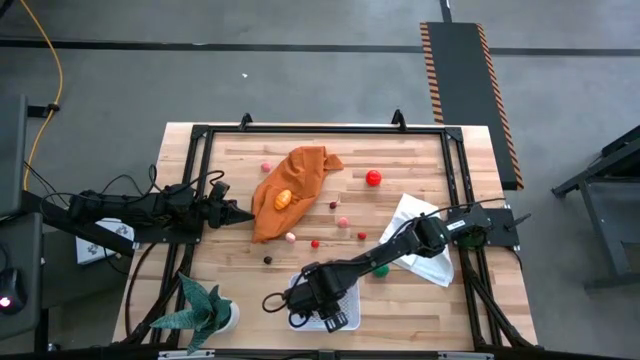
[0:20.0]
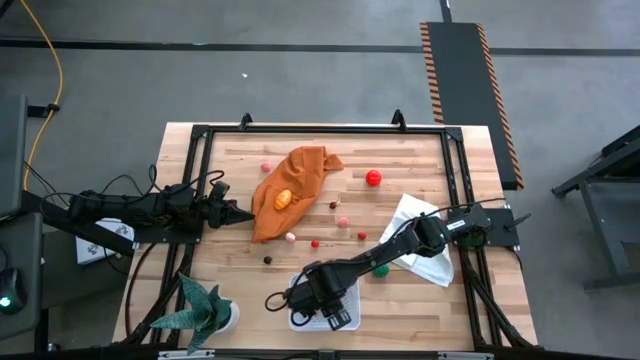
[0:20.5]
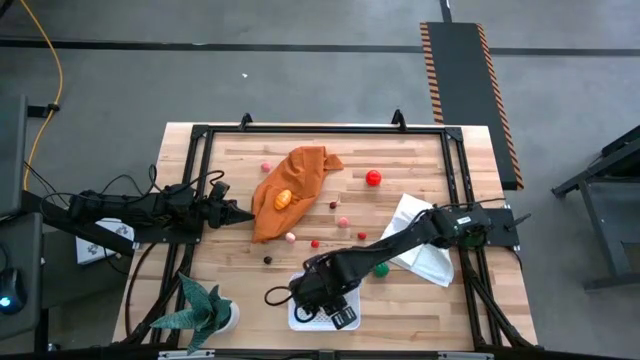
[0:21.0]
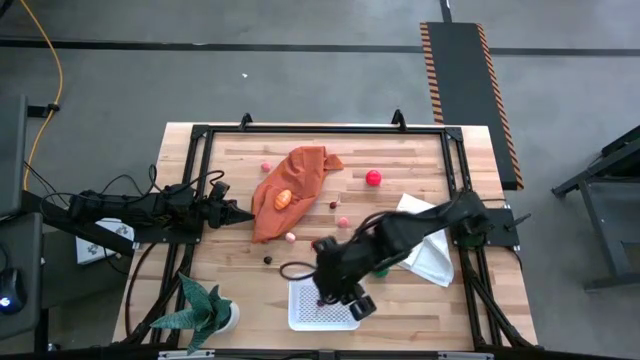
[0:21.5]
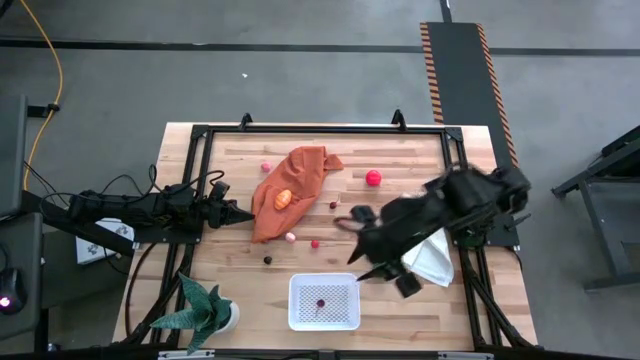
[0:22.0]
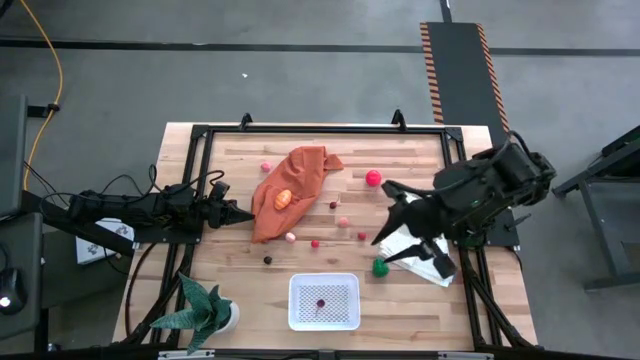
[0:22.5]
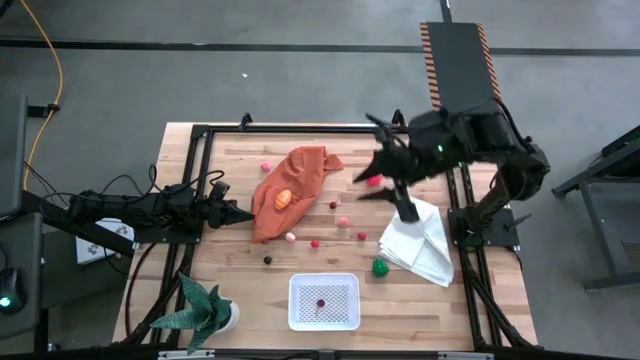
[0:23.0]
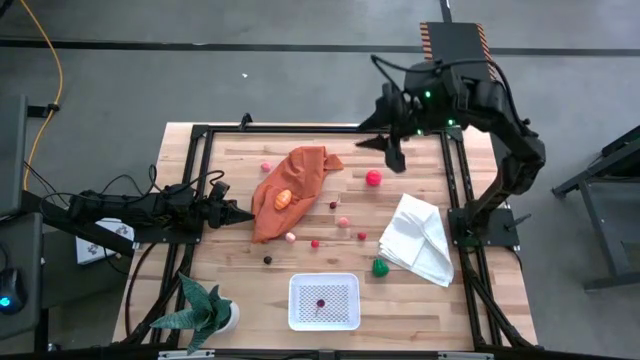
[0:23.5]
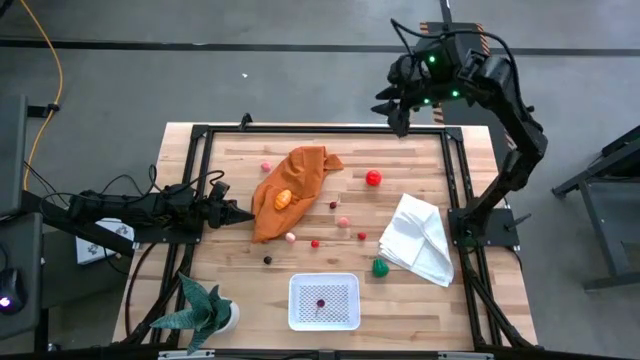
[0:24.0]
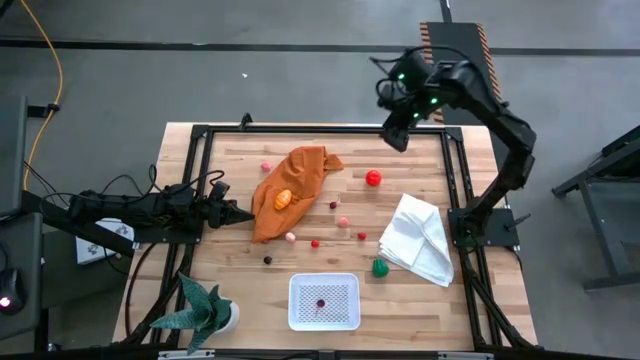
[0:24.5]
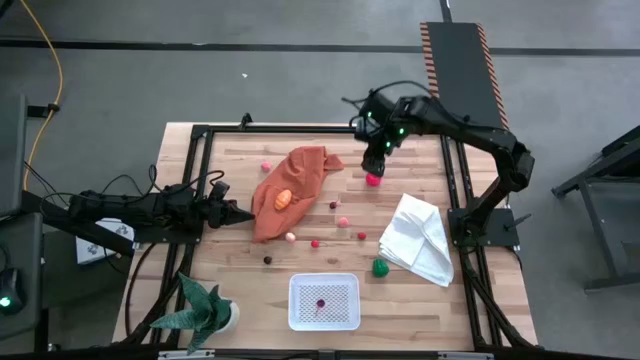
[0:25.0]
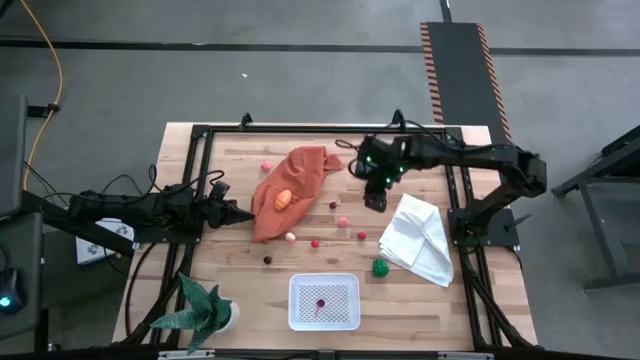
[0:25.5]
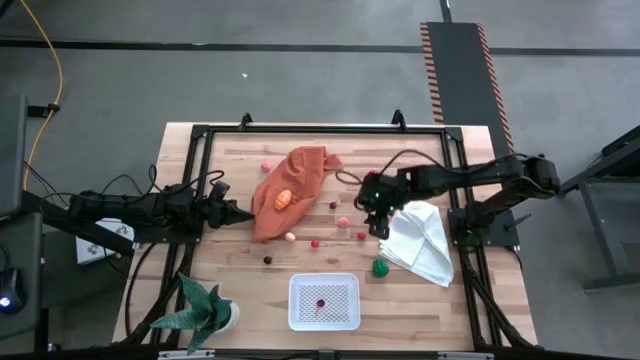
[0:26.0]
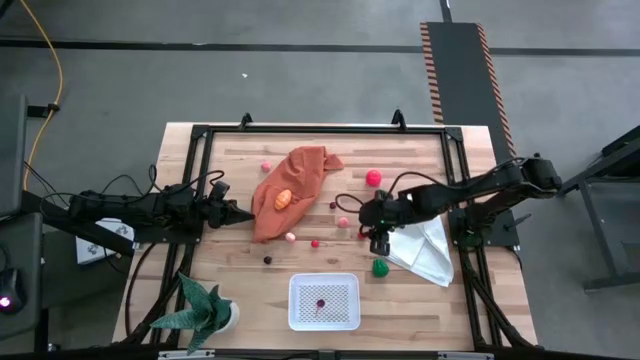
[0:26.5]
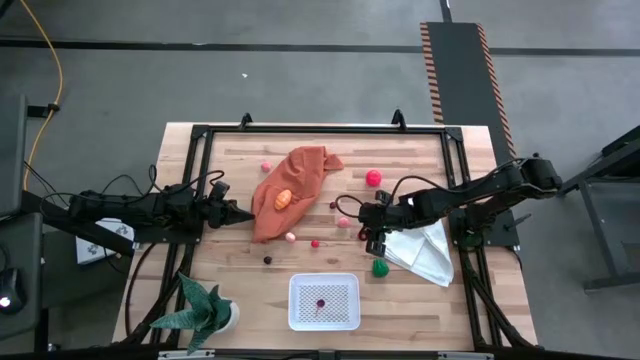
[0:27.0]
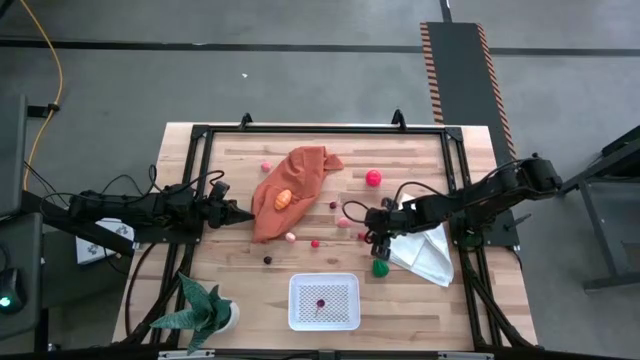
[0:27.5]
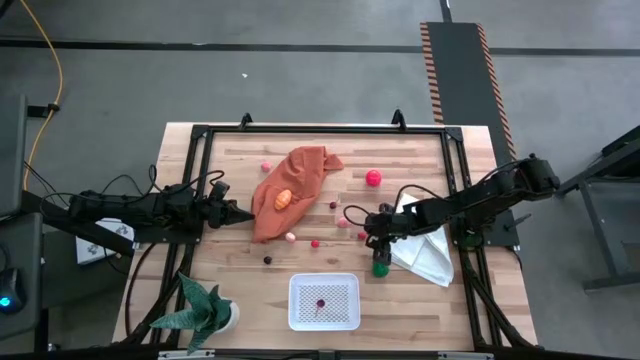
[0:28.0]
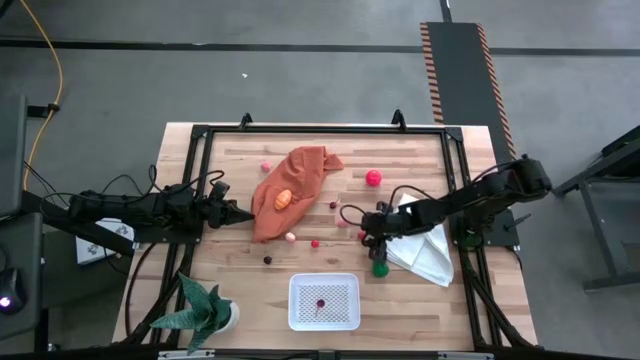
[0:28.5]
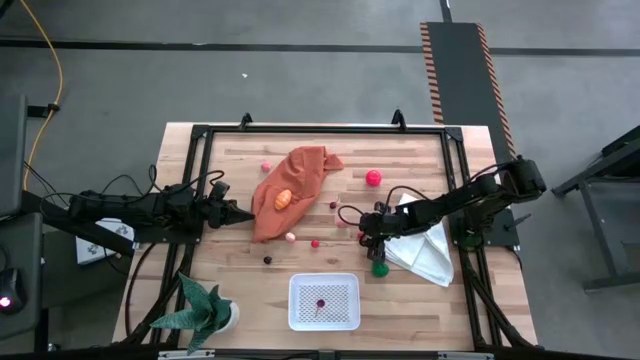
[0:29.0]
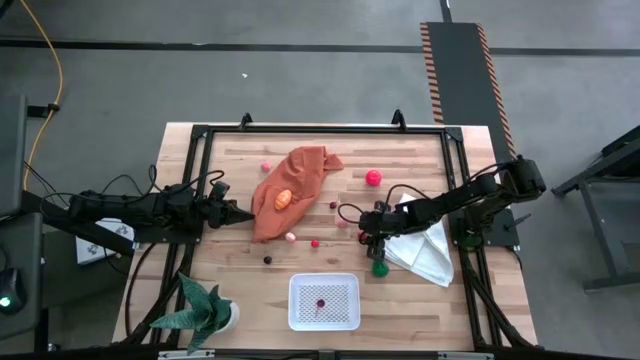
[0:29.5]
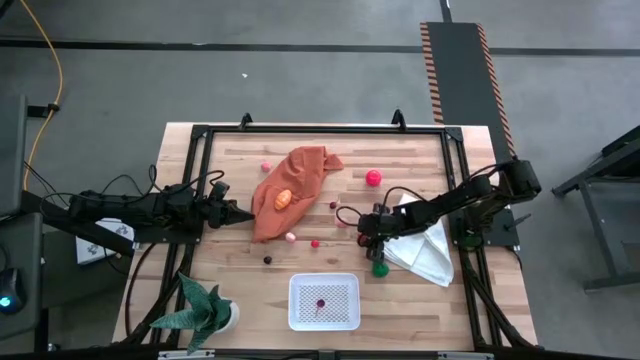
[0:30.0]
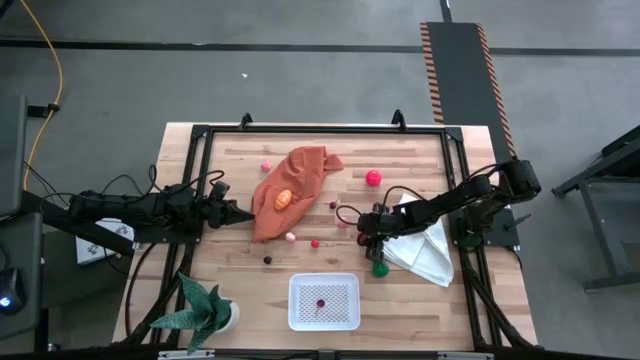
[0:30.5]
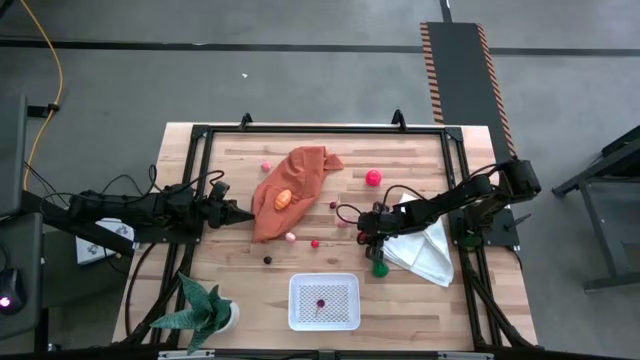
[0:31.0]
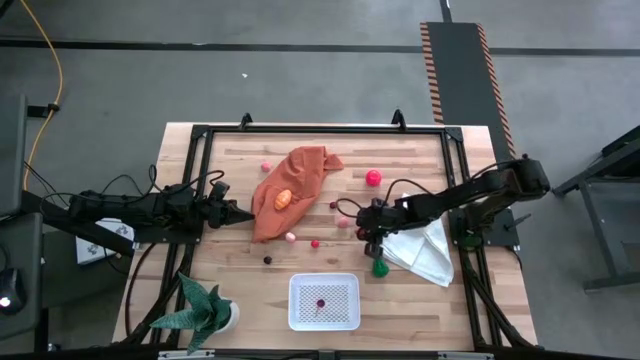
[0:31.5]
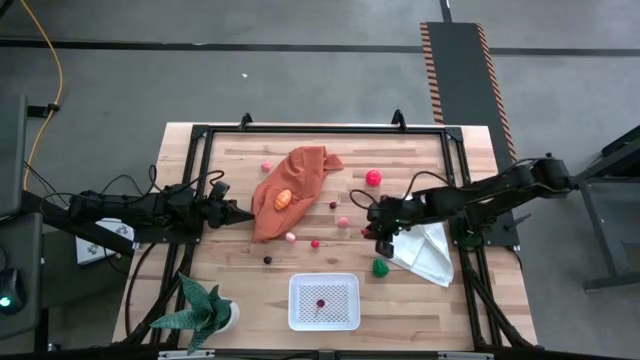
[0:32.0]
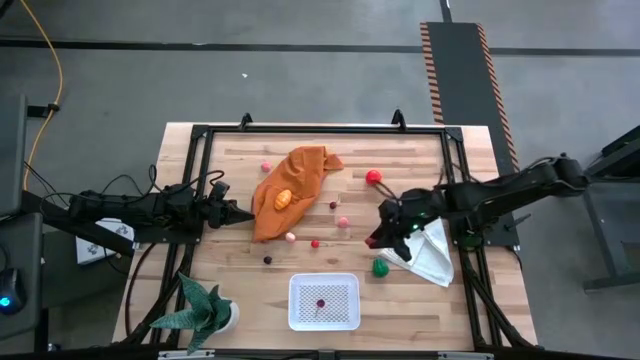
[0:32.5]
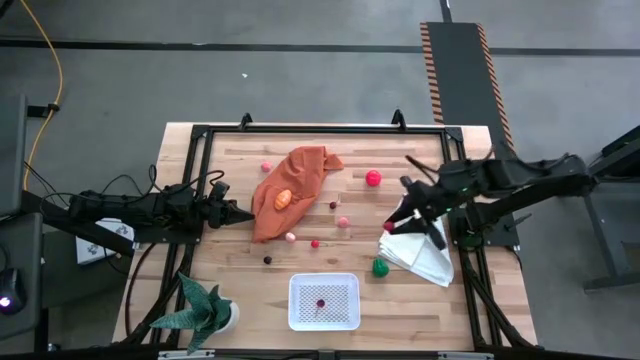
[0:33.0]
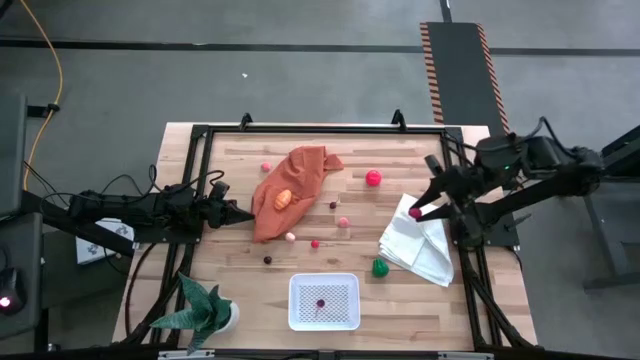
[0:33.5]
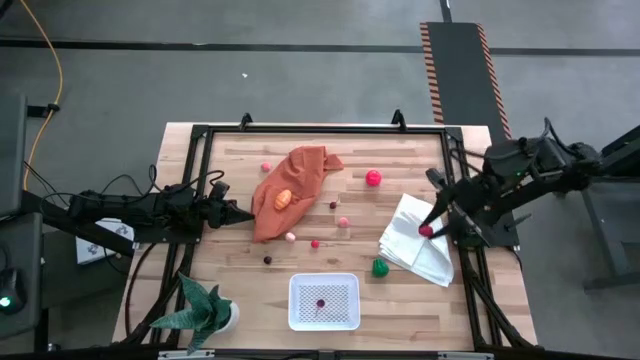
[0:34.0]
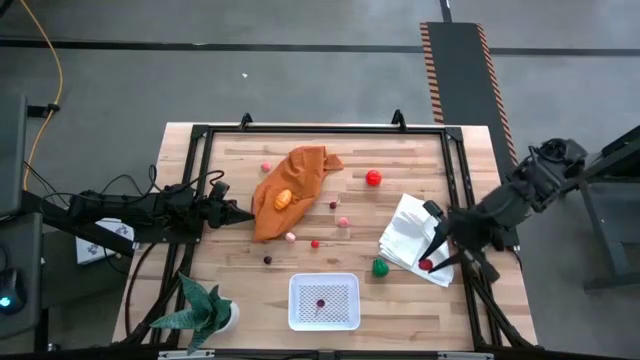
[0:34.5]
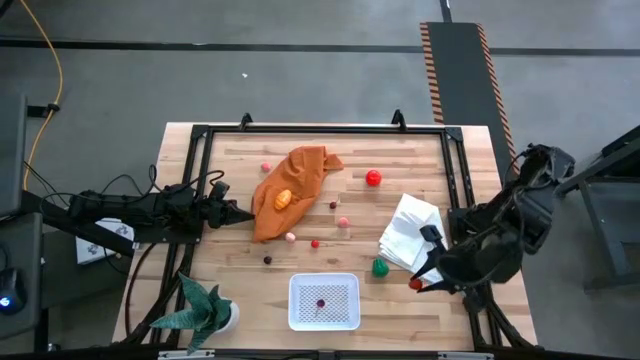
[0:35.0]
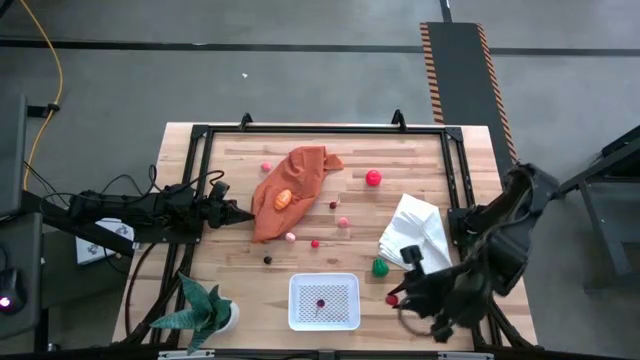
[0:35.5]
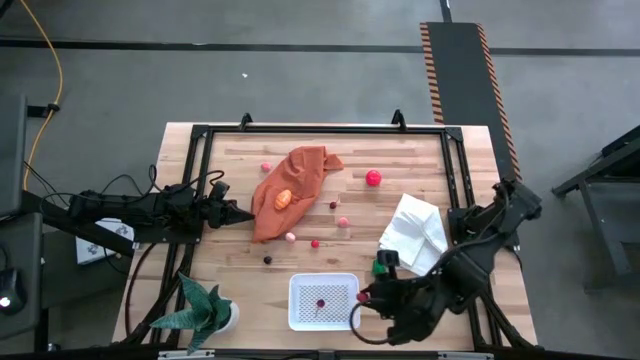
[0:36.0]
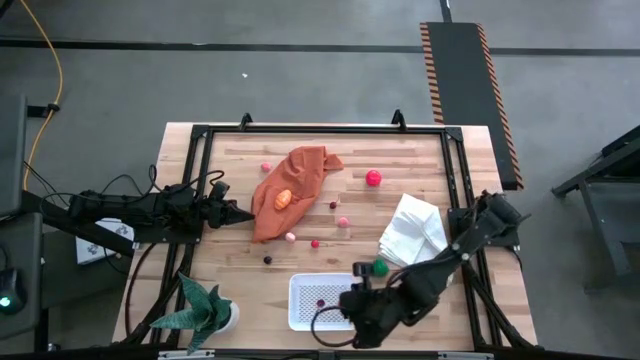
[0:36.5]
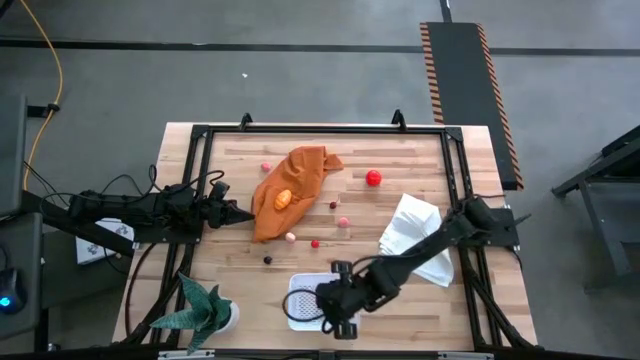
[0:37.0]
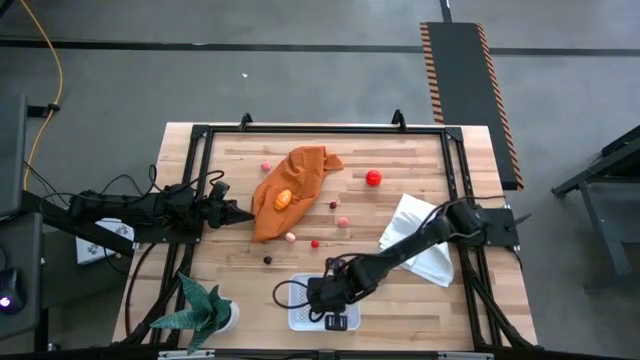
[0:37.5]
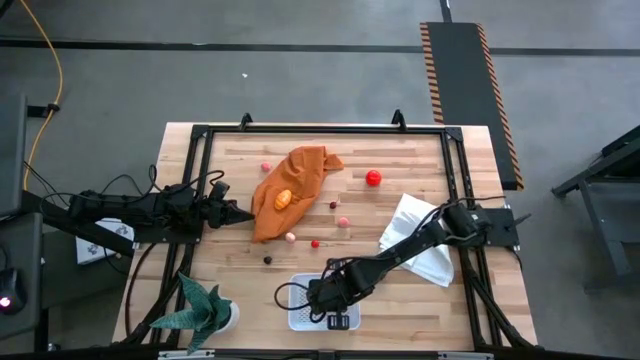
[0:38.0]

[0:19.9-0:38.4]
Task: Pick and placing Produce into tupperware
Put the red strawberry into the white bin

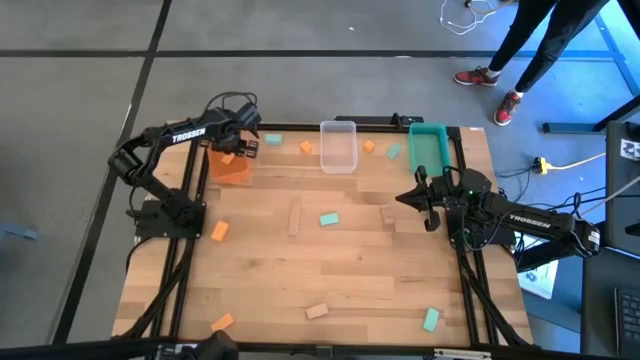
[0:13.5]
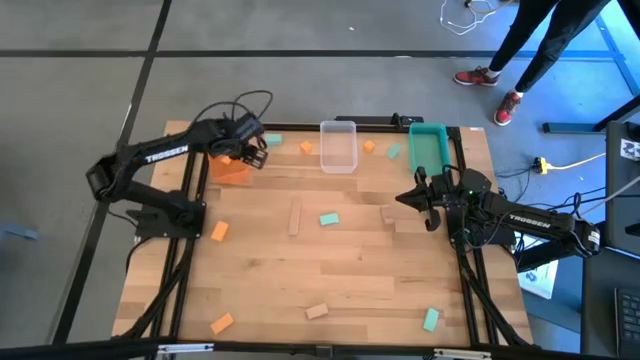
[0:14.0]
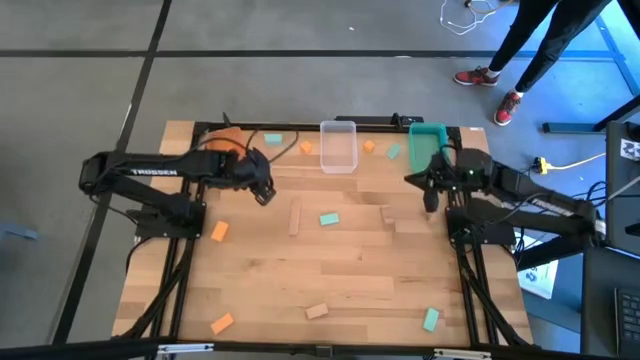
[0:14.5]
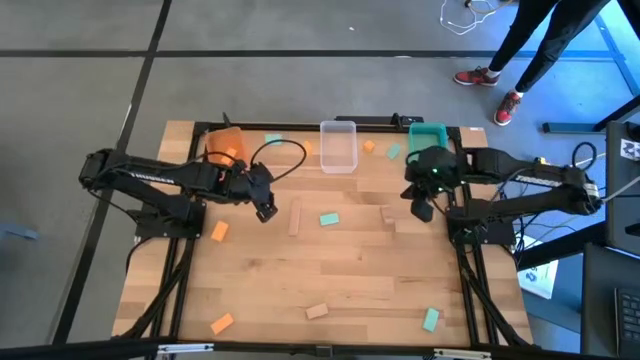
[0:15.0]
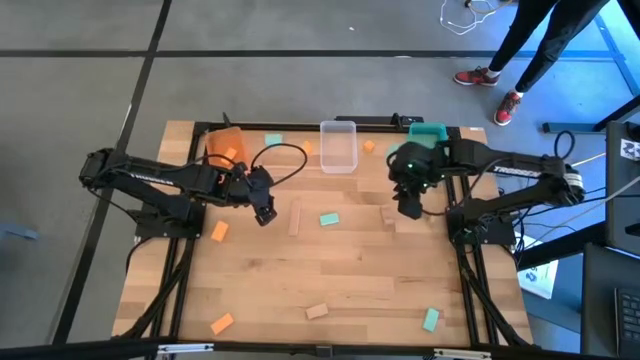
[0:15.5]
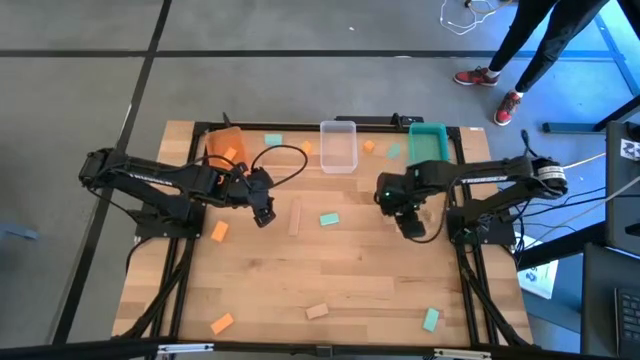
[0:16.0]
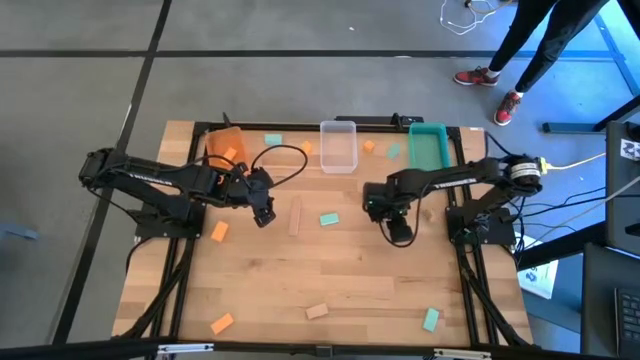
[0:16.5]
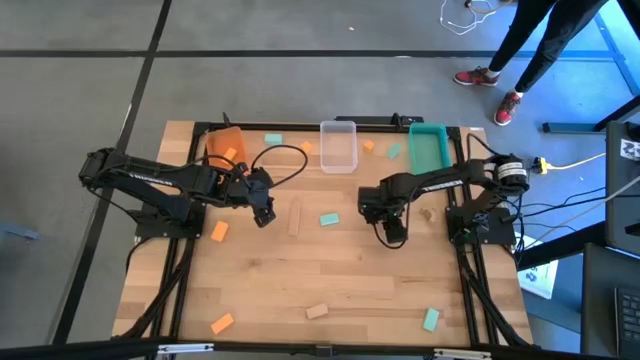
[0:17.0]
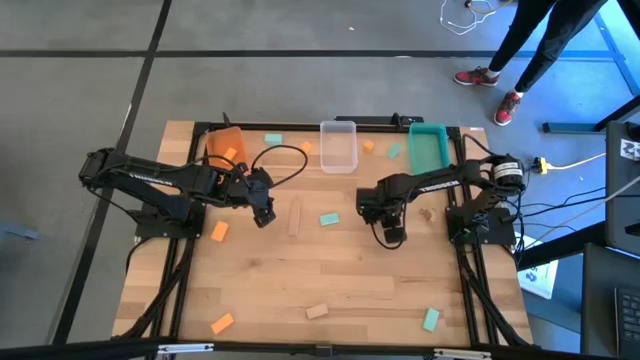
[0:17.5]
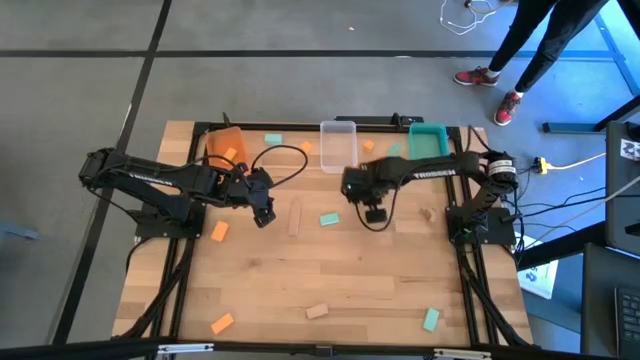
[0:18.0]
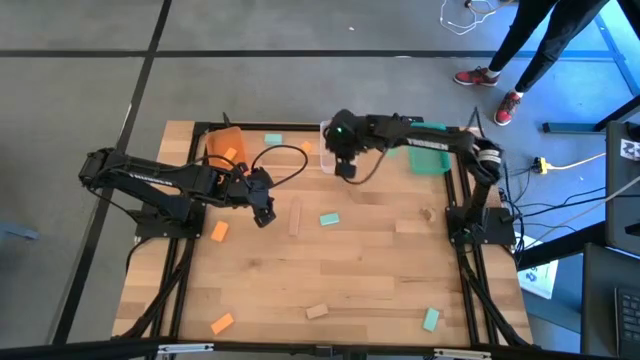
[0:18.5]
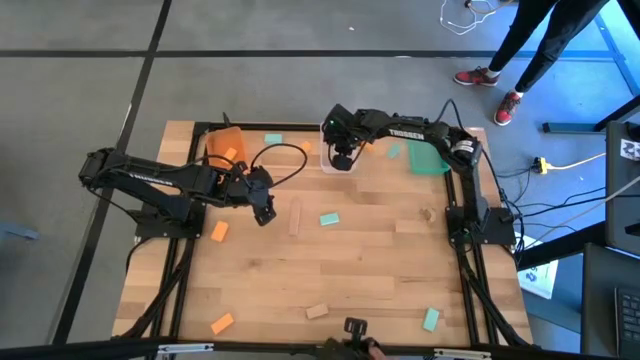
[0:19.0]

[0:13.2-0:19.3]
Task: Sort & place blocks by color
Put the brown block into the transparent bin
